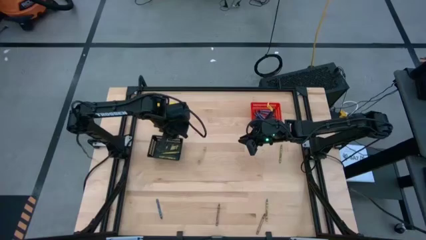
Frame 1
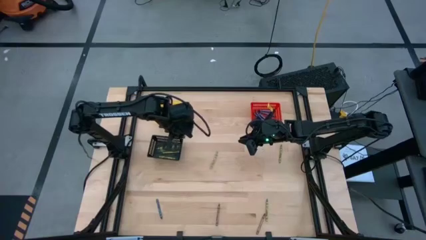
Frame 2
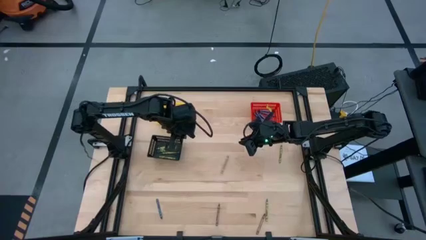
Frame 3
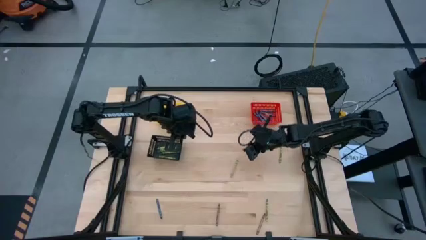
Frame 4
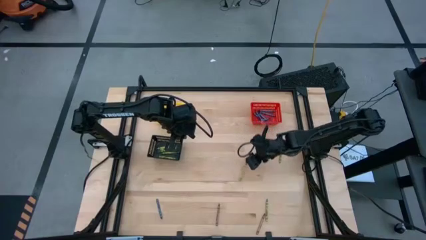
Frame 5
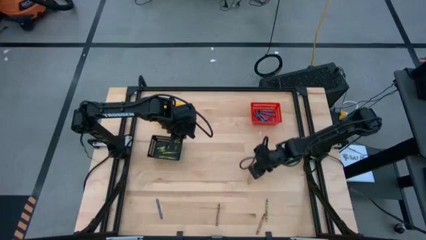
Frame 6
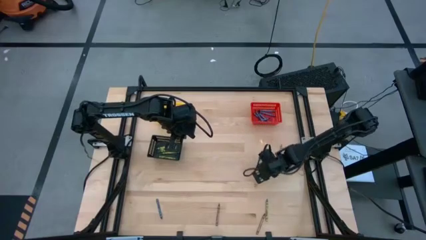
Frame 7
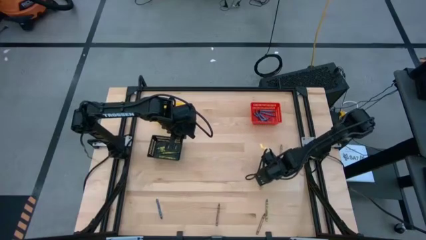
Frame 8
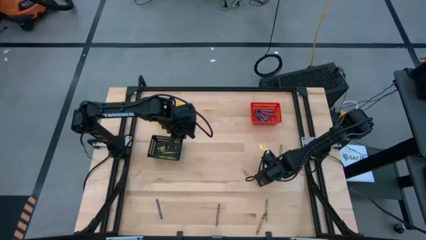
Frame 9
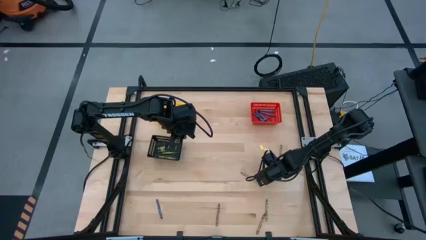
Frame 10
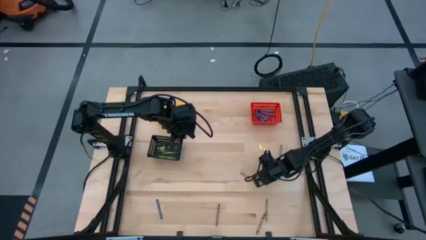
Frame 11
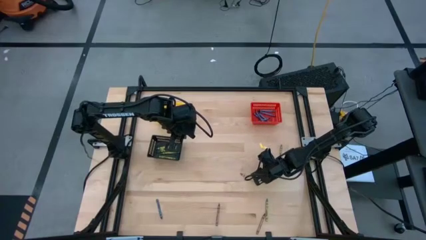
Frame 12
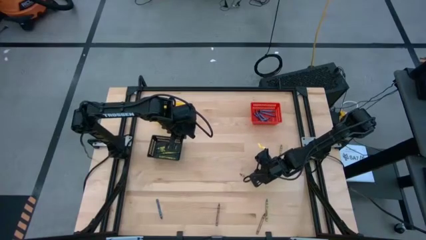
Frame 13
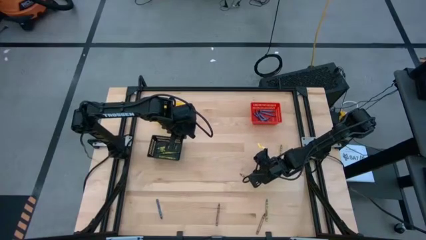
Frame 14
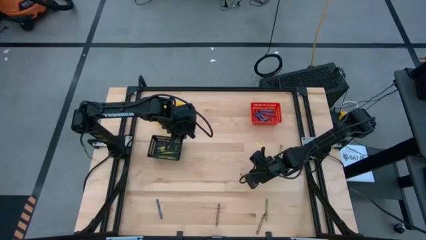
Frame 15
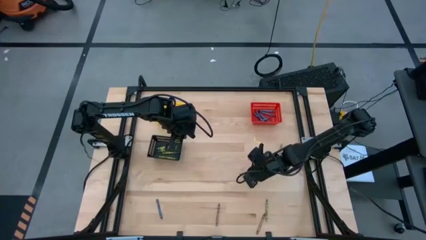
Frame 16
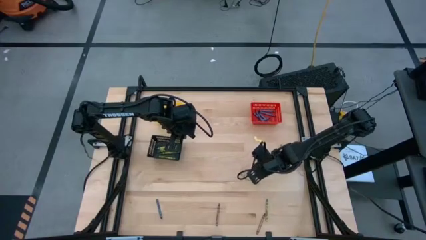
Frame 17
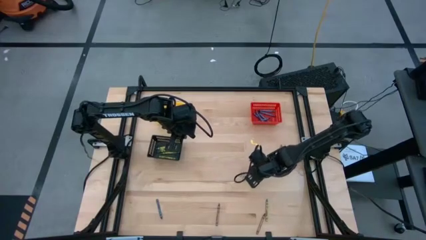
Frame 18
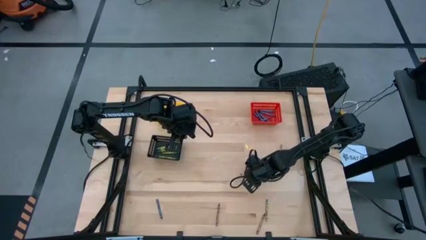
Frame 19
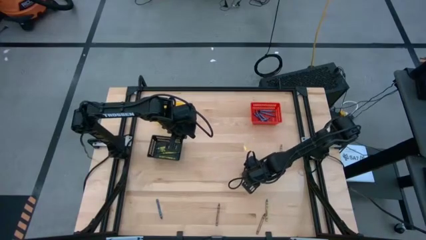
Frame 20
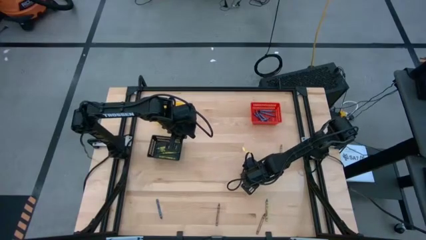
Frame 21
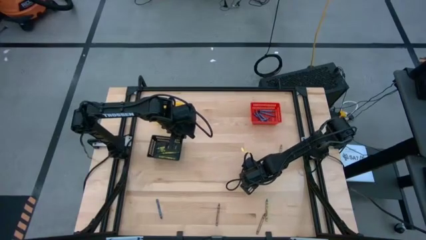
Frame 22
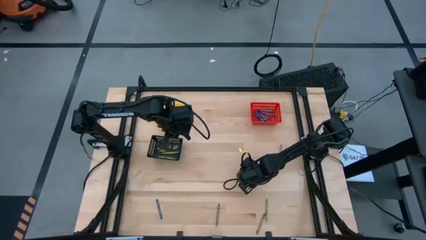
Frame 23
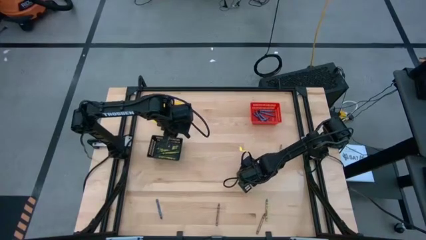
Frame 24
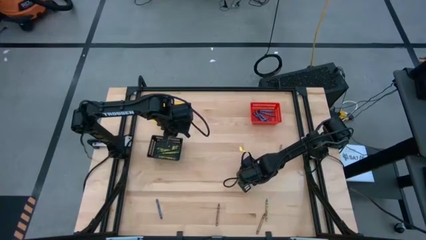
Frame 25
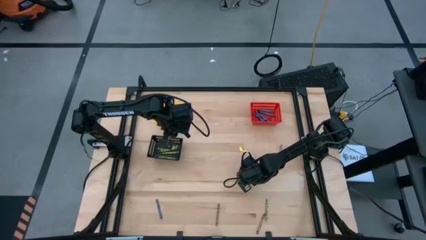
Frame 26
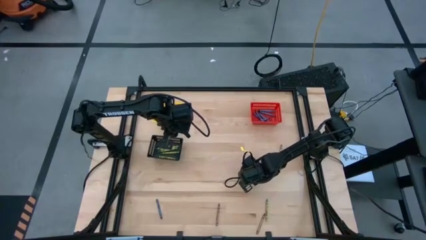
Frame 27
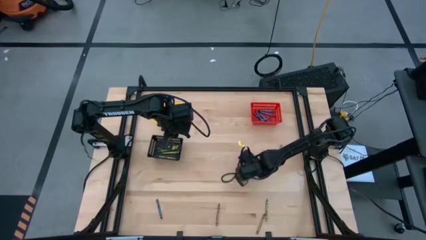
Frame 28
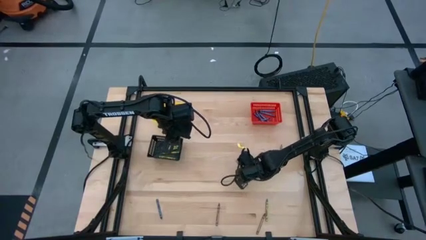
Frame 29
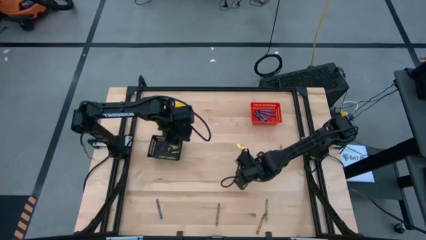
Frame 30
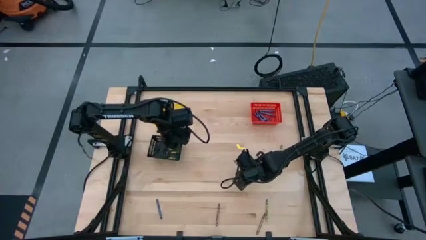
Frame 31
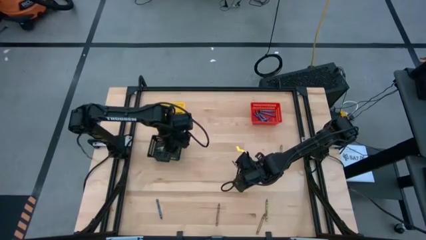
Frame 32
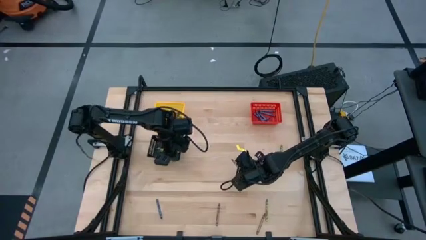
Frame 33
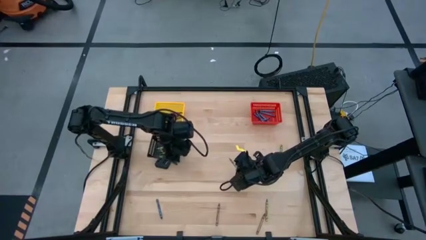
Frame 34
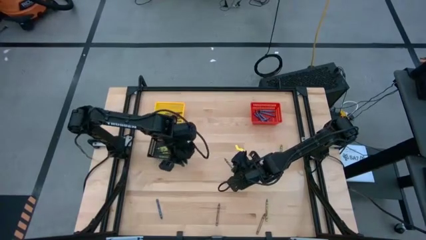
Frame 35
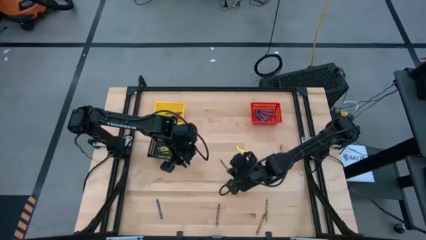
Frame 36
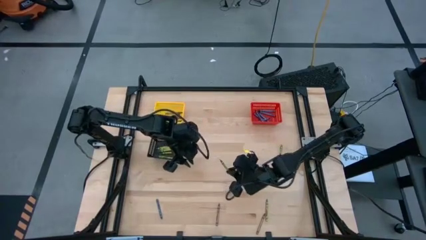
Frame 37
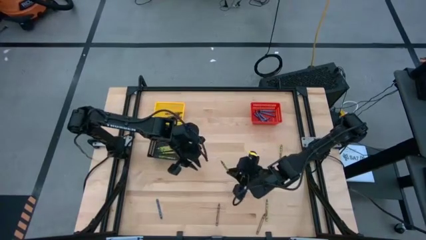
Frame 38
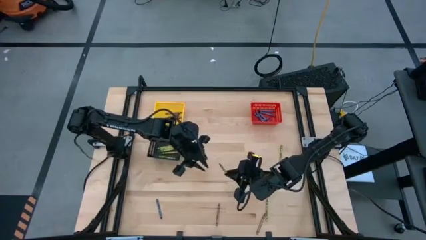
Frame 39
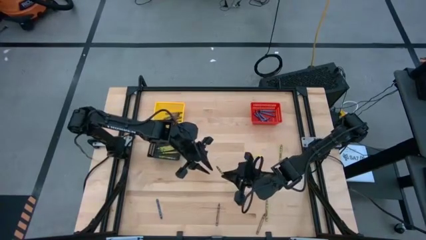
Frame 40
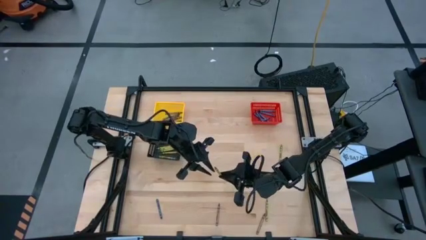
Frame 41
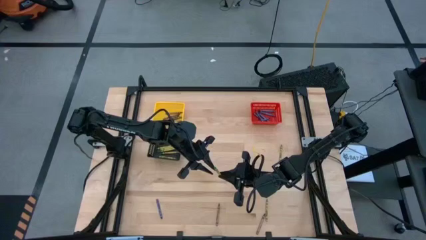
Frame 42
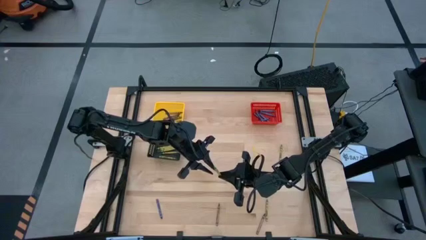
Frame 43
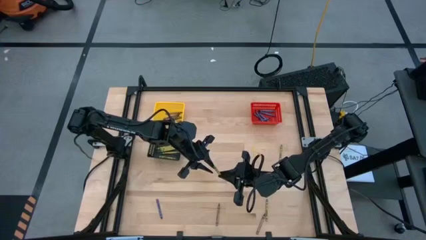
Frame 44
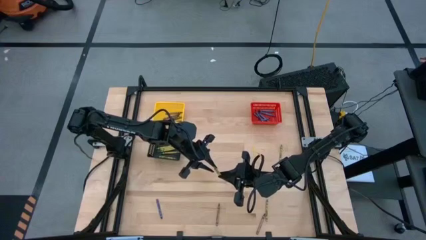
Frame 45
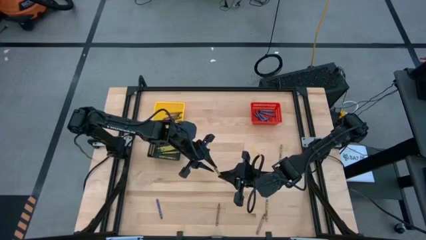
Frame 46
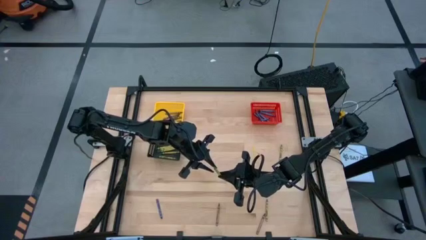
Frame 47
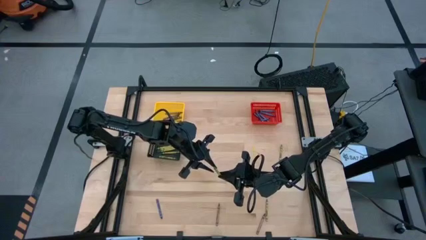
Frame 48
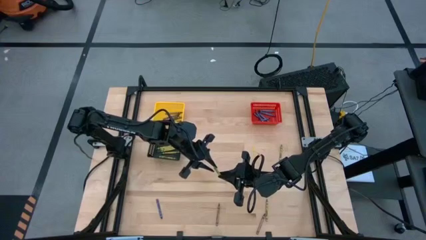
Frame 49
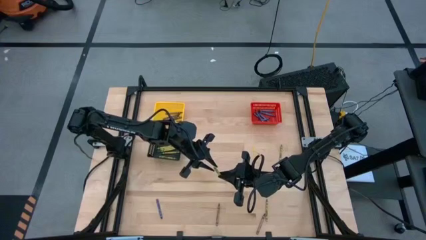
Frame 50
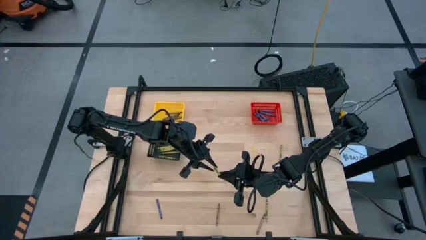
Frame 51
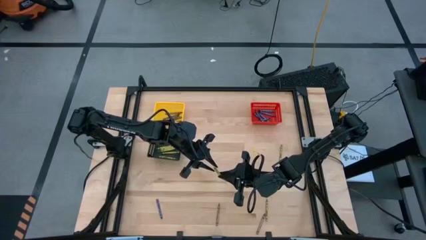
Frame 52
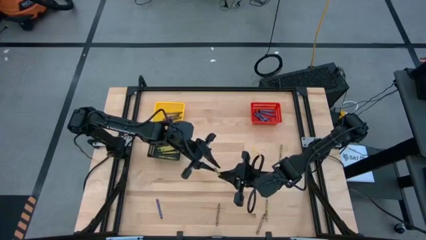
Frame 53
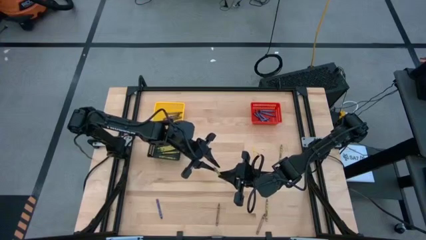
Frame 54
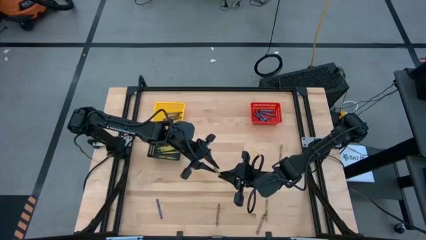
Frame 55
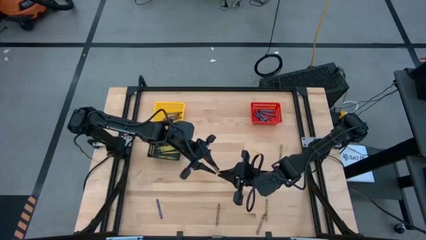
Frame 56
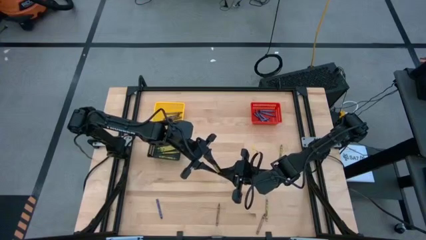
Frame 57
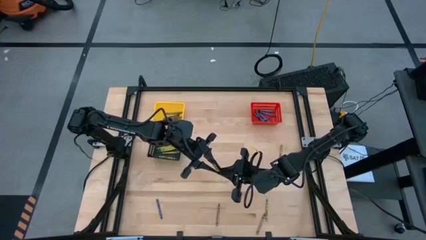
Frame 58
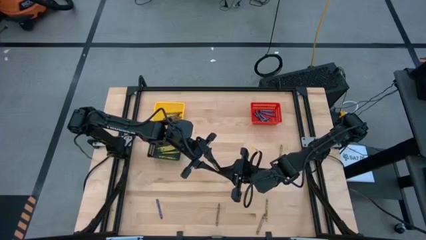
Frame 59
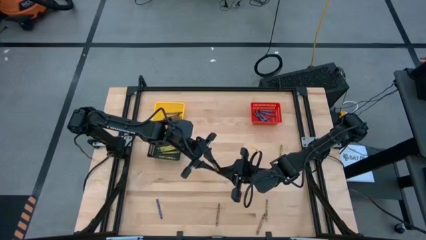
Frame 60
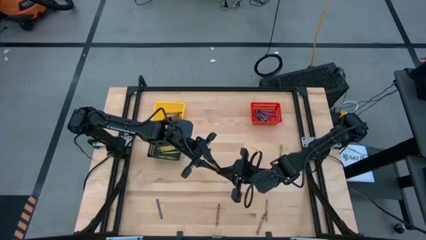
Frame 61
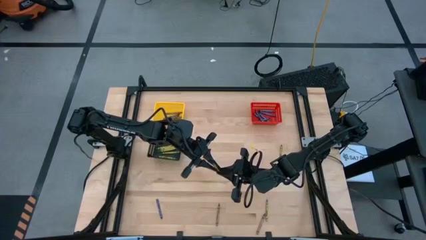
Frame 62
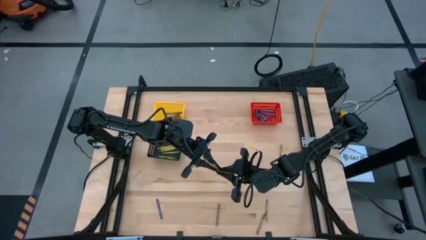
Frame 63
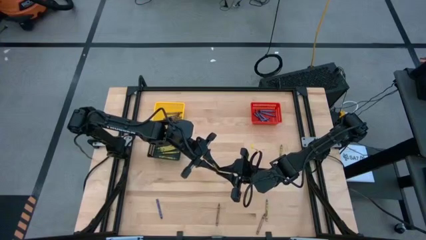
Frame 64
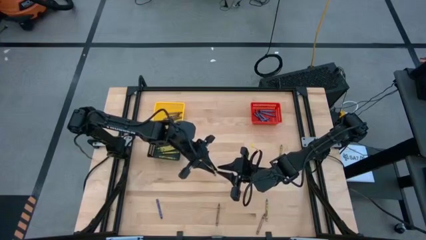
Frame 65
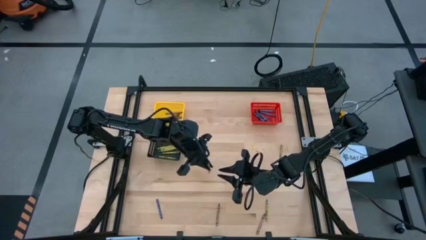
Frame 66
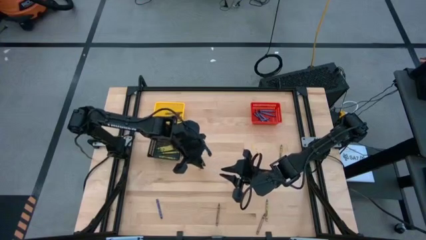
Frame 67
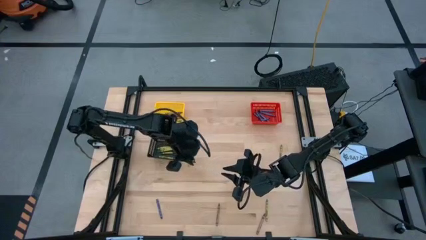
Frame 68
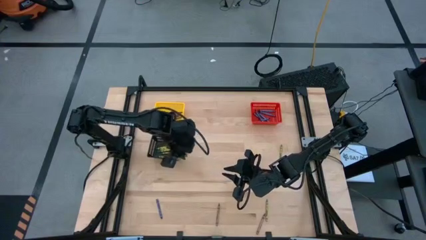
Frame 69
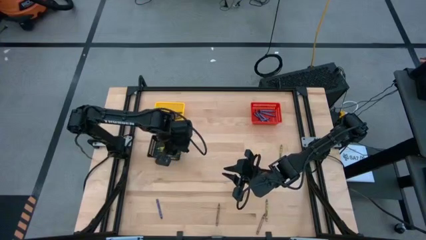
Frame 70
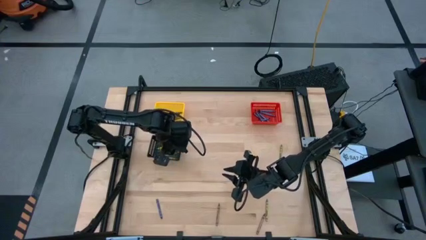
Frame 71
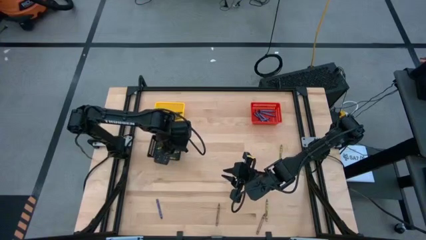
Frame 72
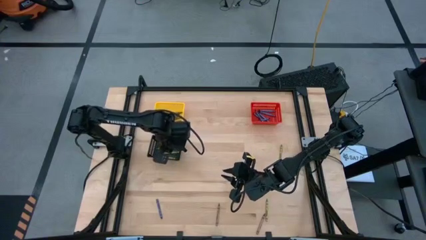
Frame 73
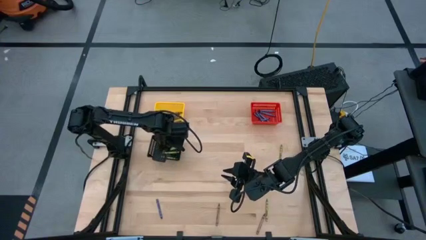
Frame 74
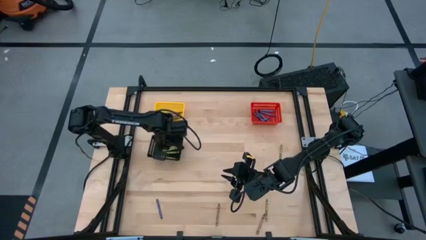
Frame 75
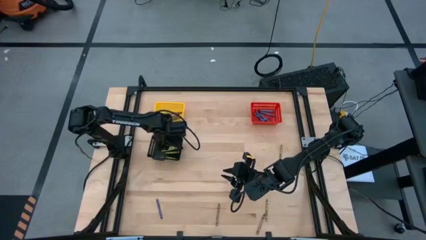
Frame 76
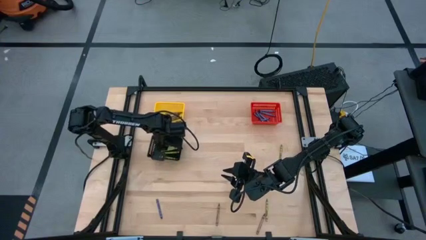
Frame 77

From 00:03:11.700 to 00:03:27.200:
Task: Sort crayons
Put the green crayon into the black bin

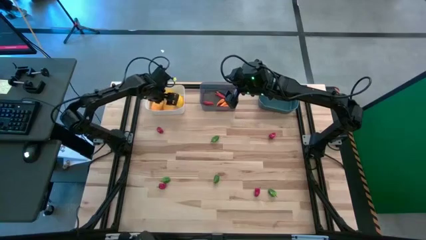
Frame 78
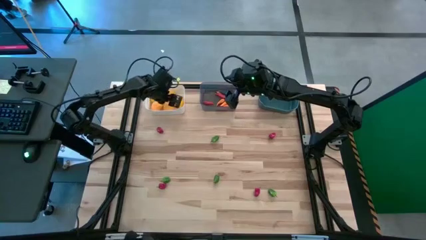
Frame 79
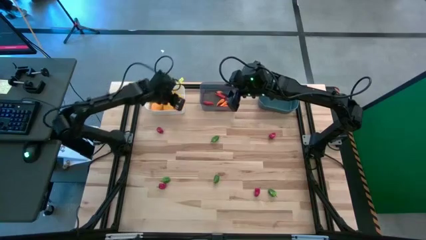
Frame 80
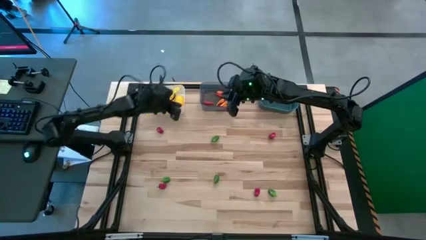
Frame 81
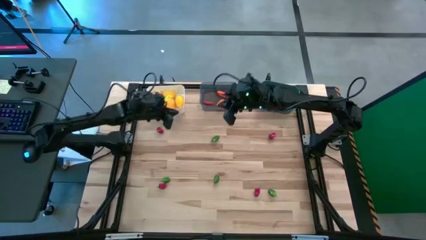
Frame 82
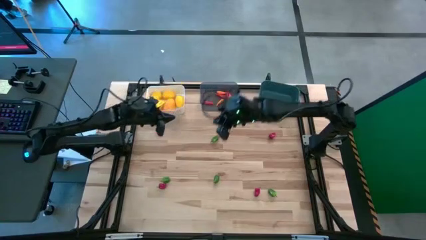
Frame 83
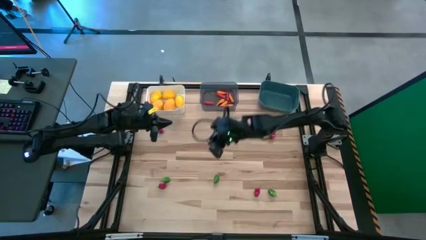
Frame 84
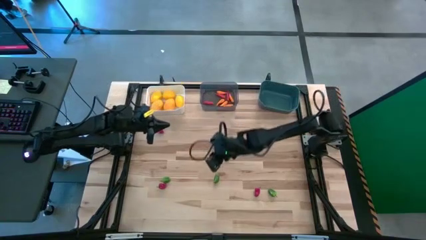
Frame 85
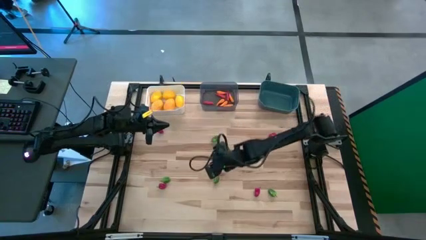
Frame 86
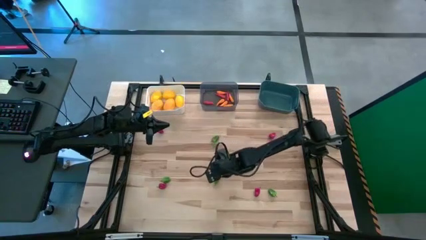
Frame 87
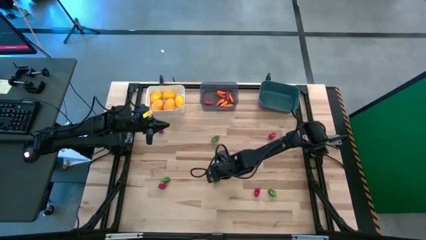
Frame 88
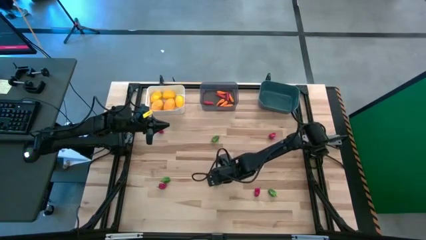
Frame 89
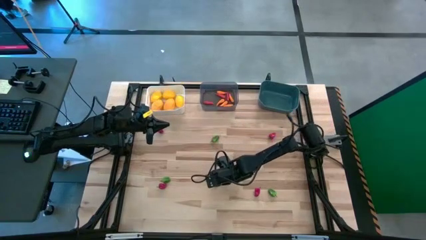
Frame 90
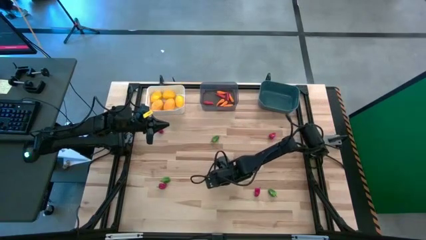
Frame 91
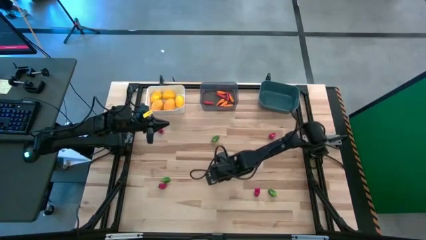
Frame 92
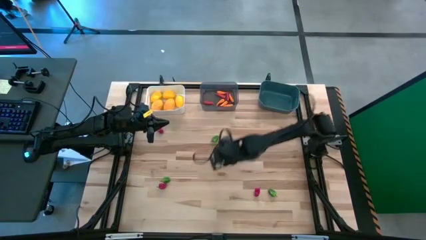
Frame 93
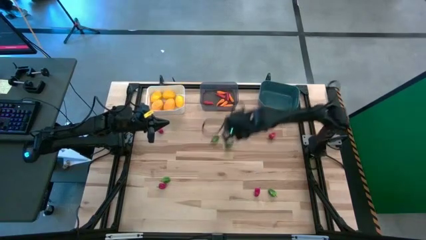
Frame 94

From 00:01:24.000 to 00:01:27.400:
Task: Sort produce into baskets
Put the bottom middle green bell pepper into the blue bin
